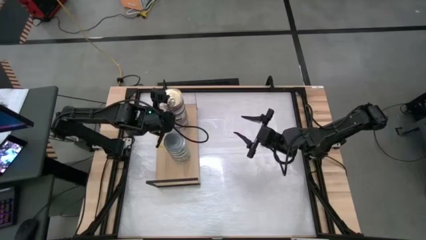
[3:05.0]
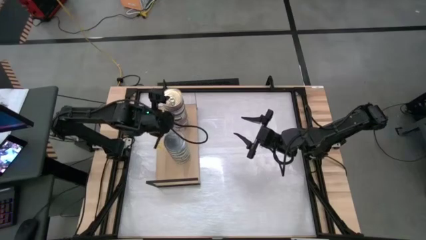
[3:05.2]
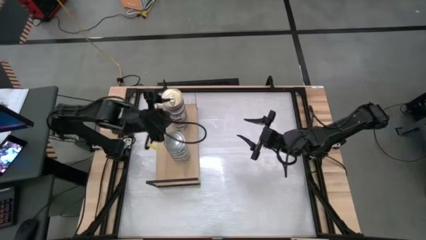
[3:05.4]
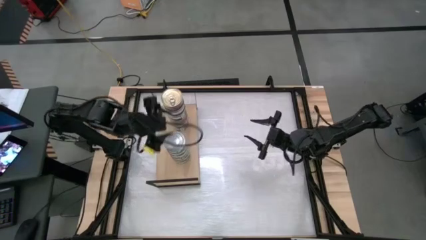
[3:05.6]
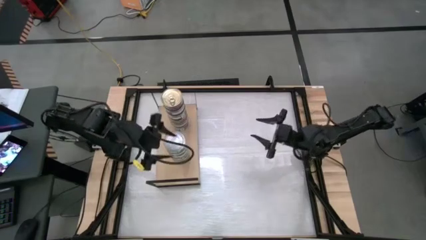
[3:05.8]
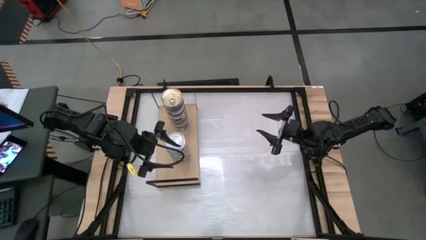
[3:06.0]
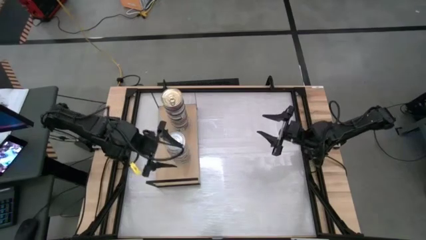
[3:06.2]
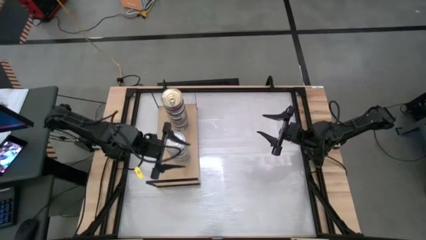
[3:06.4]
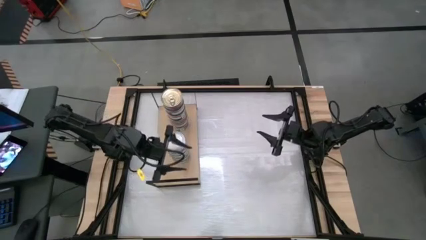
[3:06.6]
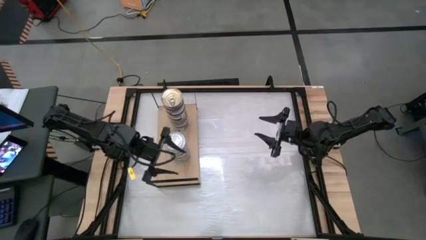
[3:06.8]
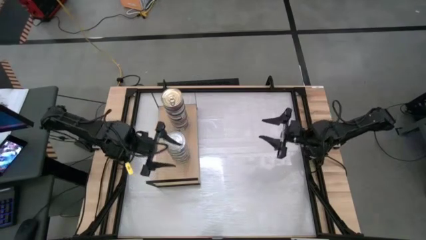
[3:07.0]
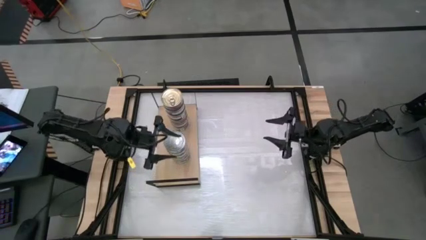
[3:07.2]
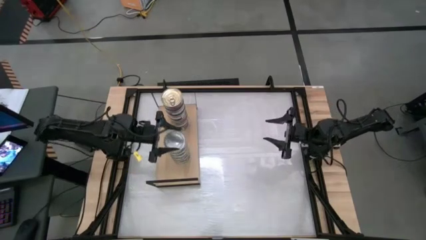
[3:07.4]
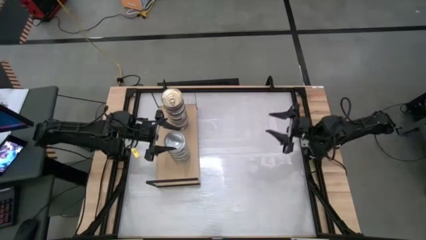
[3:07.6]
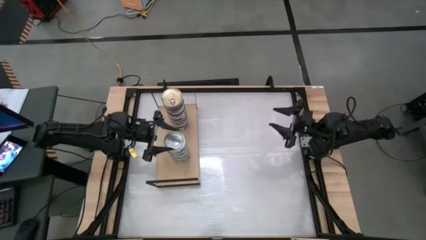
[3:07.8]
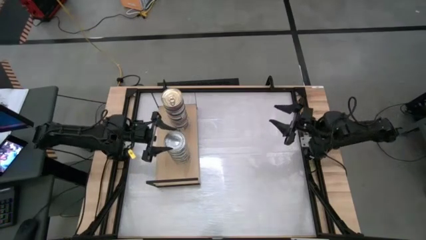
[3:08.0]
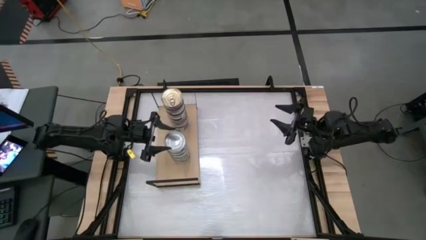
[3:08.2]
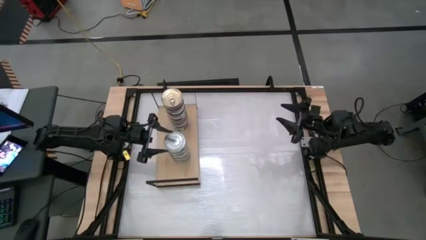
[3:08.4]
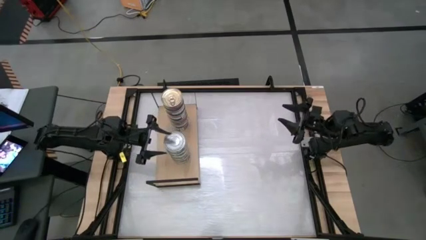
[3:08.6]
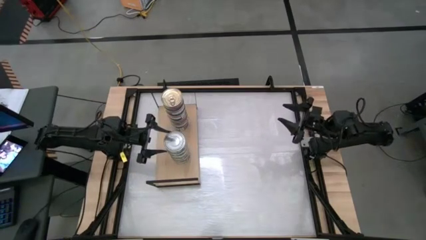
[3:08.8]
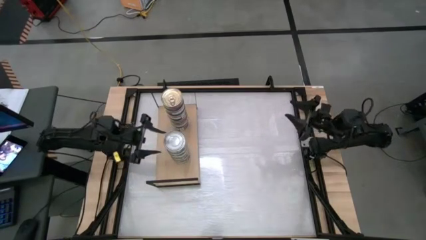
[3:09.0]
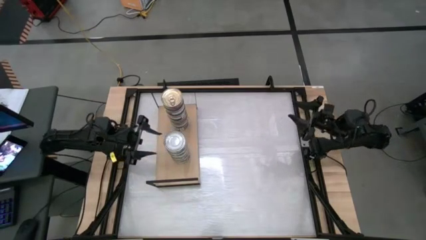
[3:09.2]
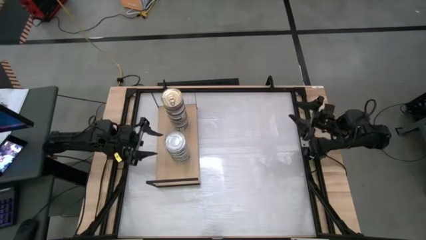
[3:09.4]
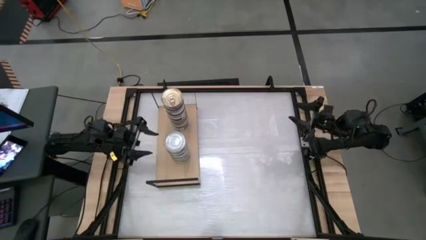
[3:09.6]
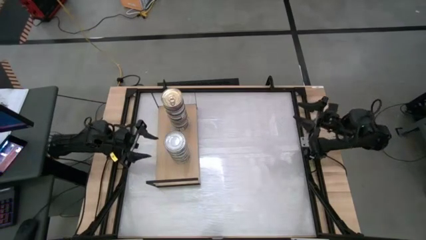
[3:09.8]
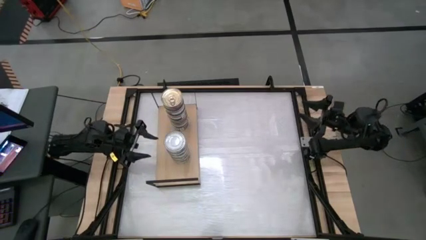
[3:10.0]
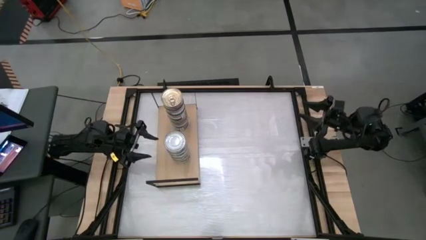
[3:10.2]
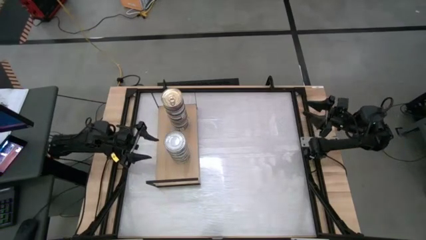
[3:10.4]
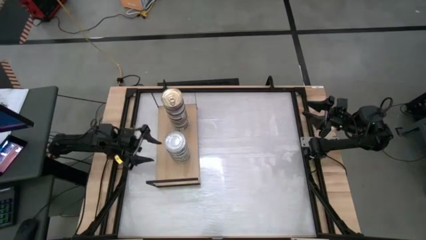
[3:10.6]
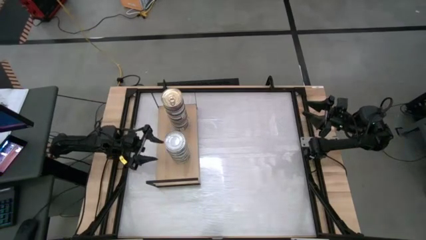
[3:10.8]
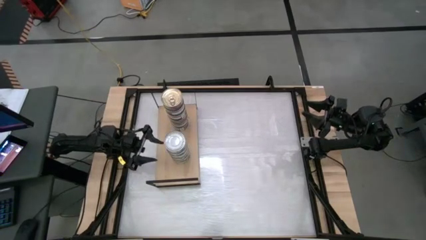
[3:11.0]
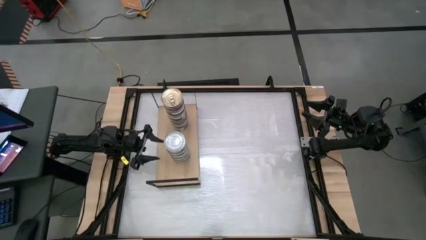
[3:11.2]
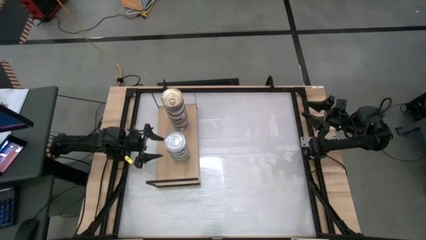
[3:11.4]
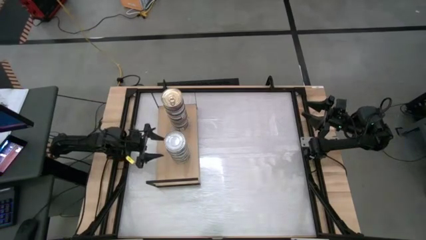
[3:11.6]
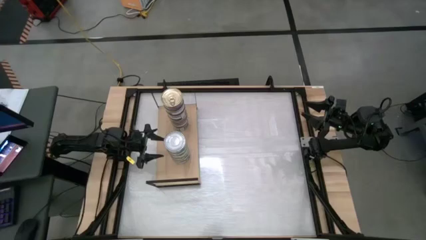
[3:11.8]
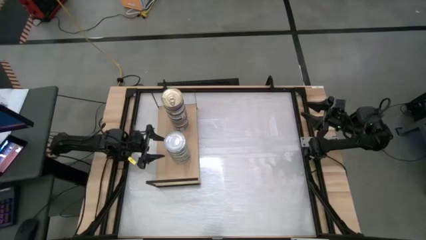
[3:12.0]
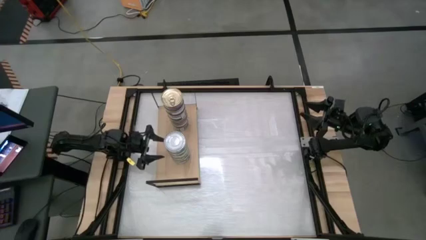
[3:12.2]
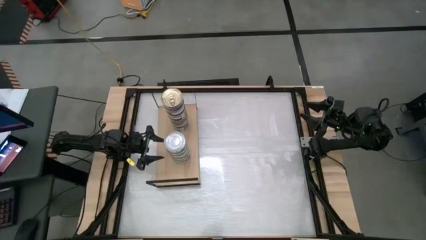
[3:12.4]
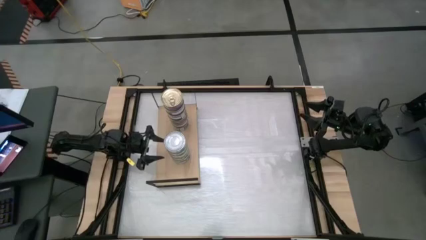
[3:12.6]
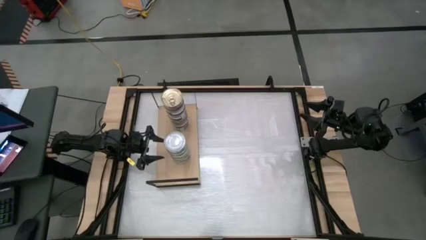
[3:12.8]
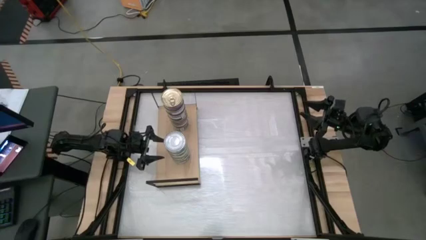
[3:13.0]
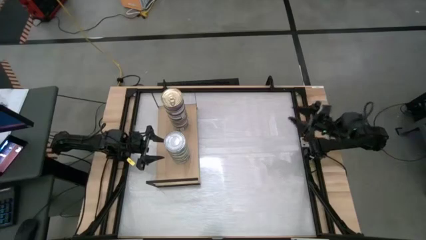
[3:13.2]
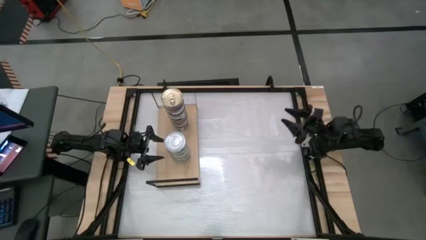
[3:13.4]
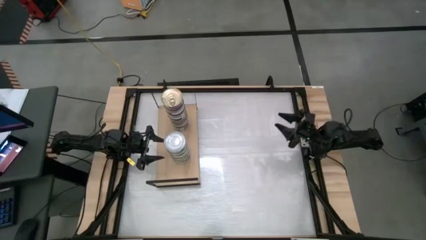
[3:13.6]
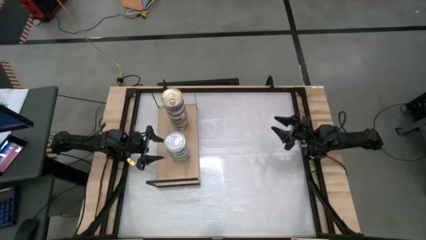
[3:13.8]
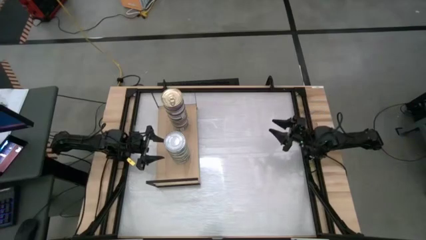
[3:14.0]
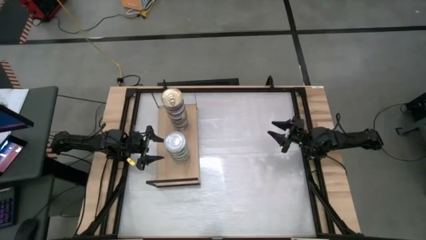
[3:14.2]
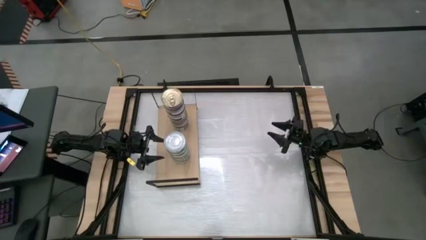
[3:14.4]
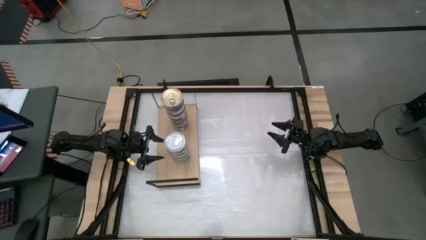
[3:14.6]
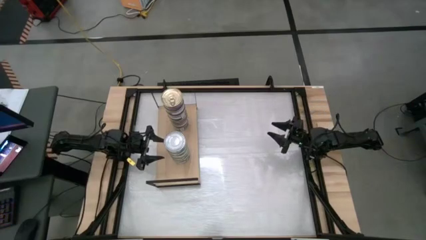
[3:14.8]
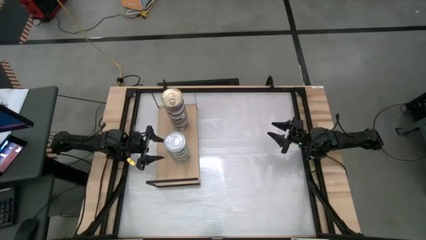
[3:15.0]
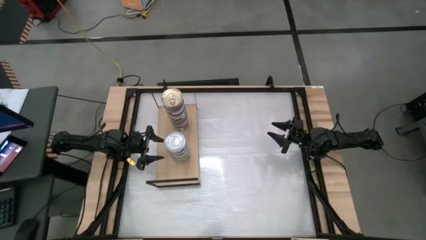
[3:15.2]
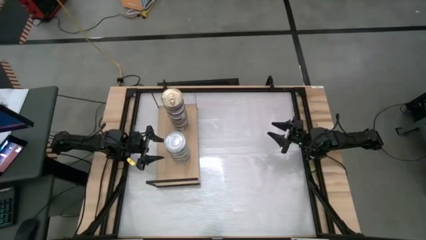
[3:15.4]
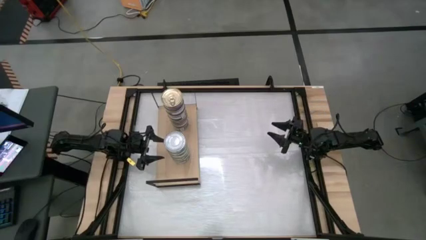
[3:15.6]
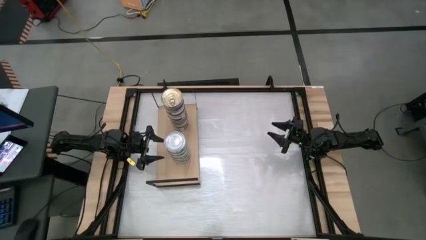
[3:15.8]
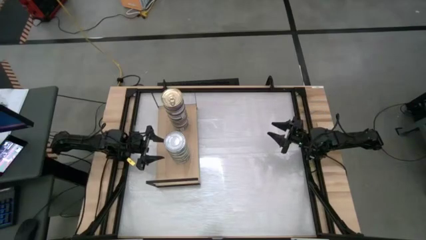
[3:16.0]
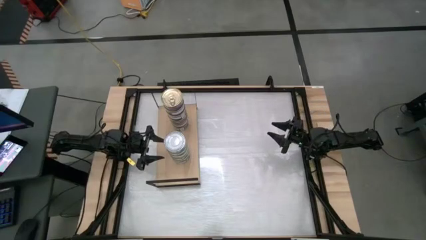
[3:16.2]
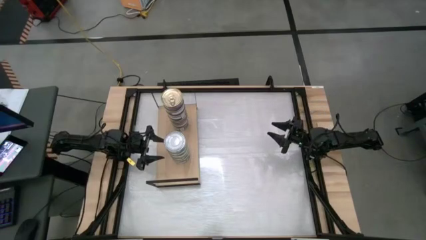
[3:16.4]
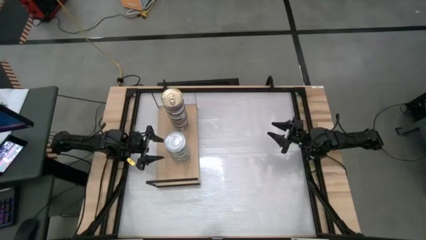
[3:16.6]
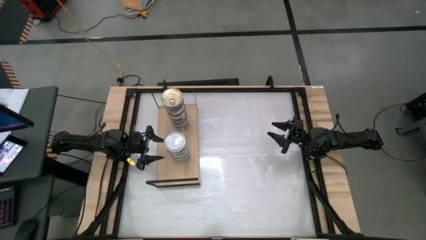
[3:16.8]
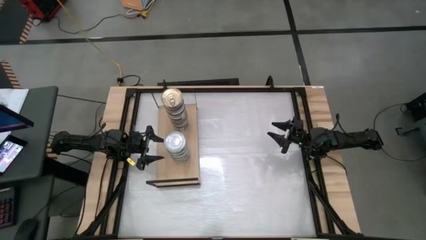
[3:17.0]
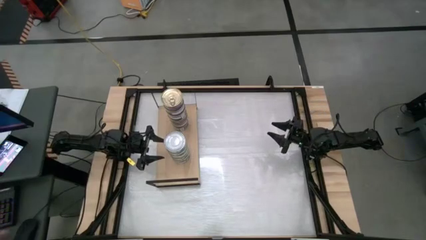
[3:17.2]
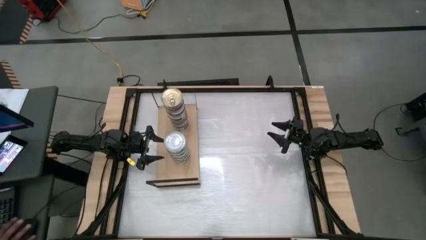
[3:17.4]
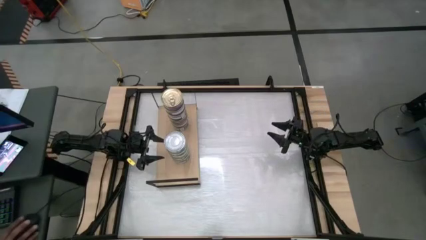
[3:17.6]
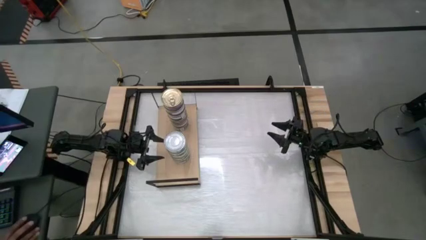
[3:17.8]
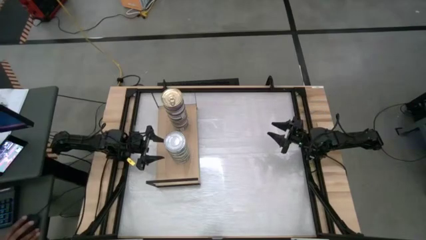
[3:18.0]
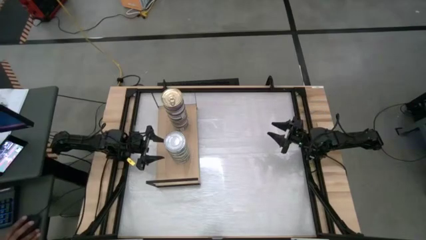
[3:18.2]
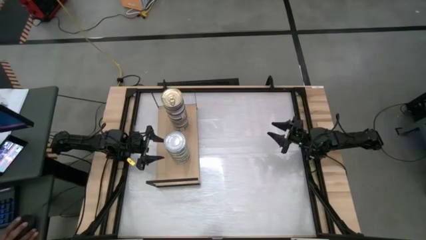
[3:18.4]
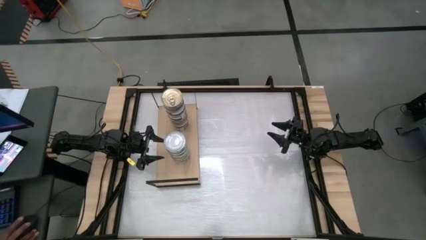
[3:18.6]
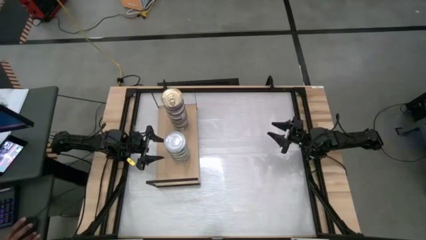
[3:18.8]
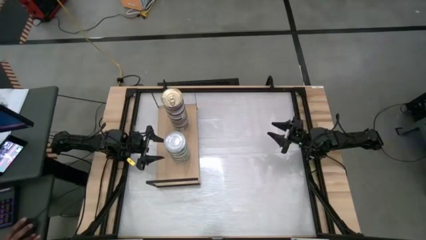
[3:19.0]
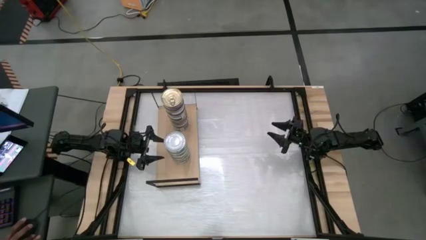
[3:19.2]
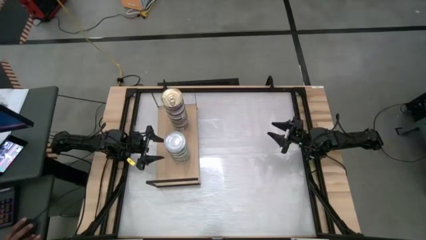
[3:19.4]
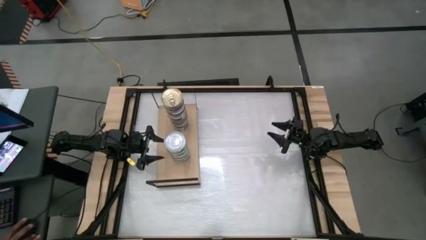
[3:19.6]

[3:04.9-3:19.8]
Task: Stack canned seafood by type on shelf
Return to Home Position

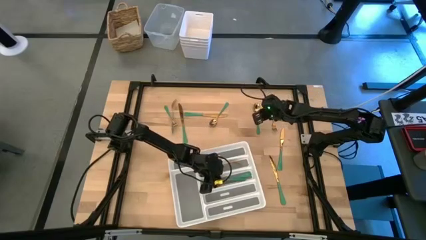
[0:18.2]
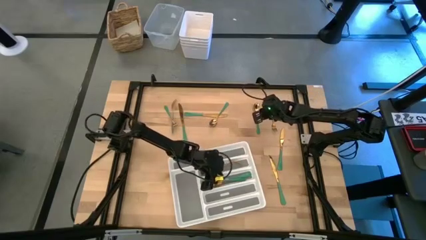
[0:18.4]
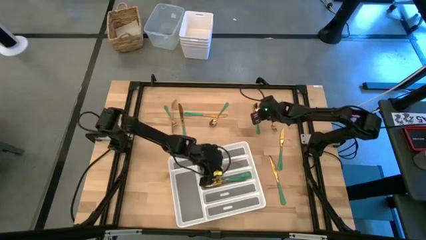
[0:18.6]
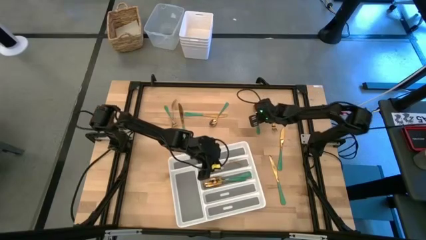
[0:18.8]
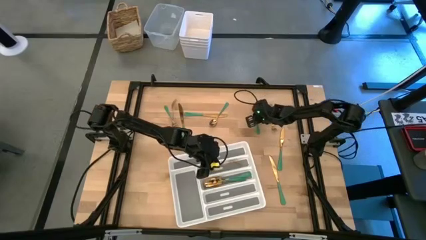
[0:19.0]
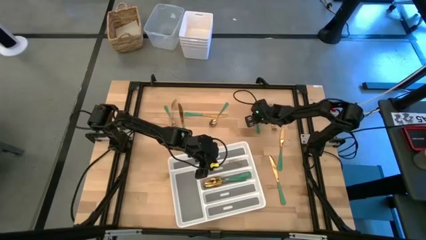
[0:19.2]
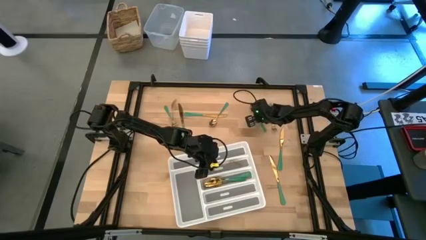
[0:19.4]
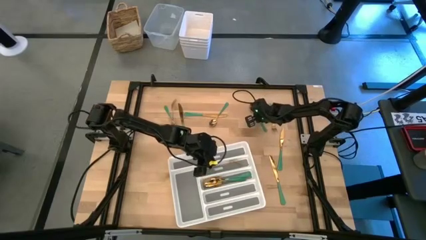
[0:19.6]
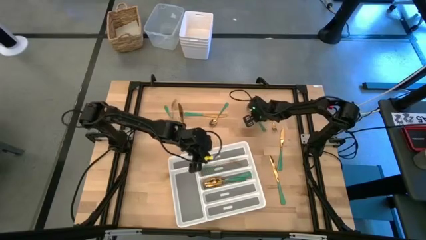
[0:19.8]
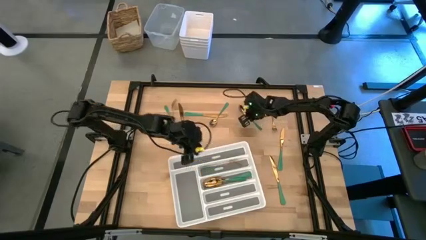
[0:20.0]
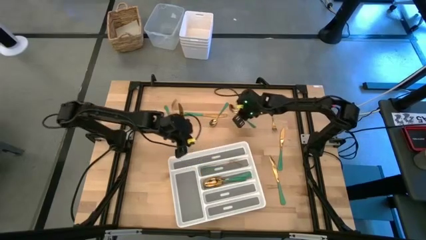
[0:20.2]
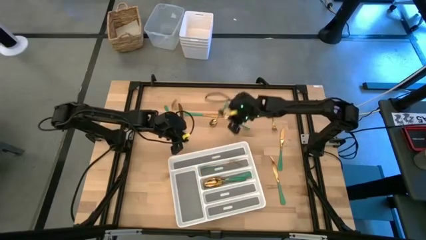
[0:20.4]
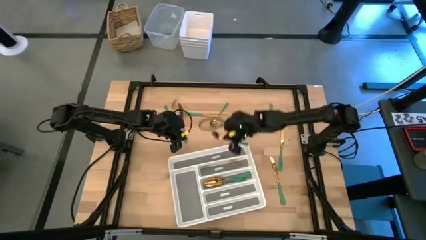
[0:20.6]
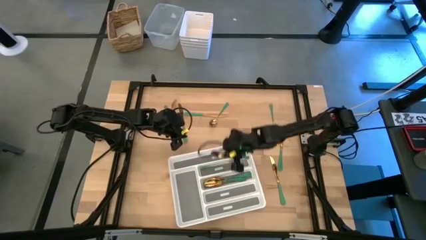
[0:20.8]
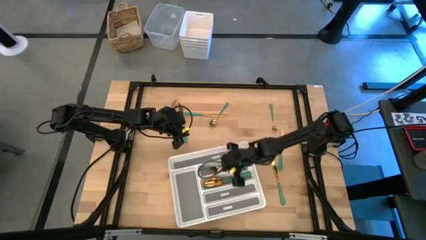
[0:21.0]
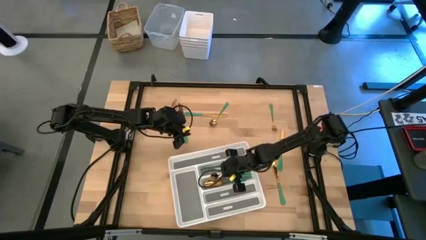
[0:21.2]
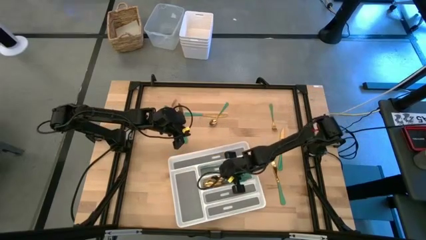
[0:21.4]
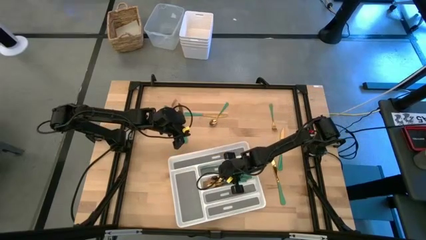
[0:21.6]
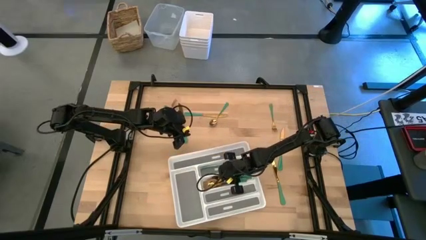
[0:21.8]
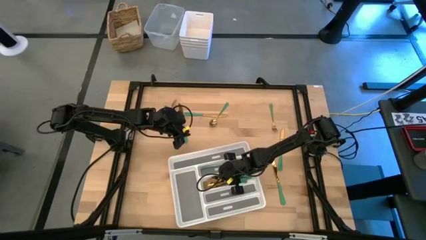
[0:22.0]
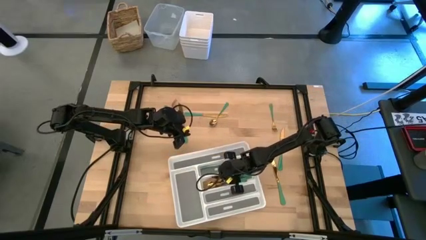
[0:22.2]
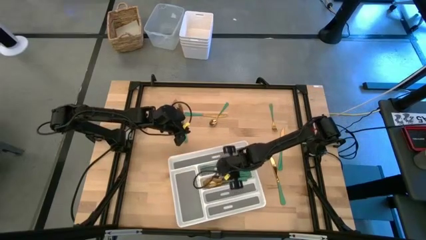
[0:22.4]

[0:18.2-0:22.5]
Task: Sort silverware
Put the green spoon into the white silverware tray
